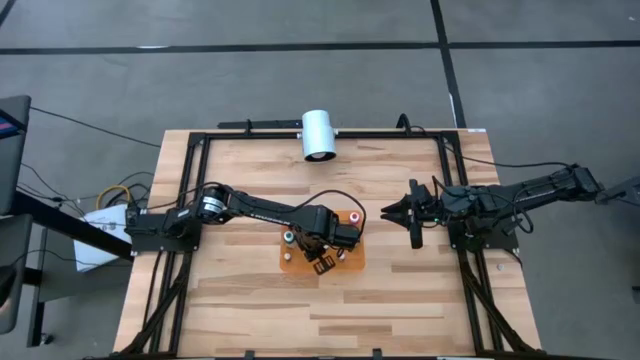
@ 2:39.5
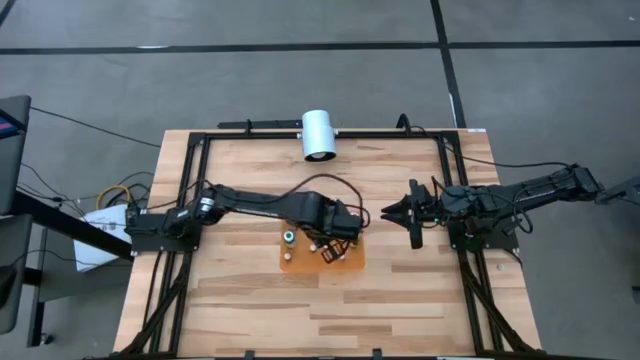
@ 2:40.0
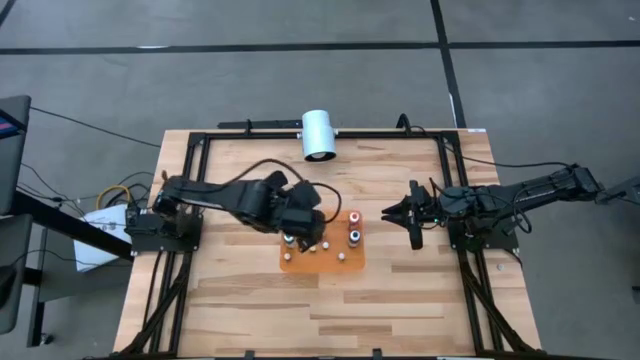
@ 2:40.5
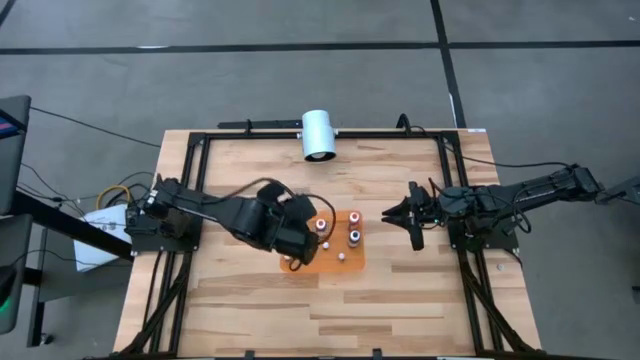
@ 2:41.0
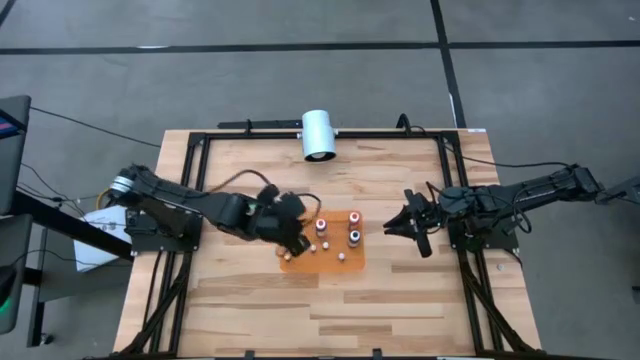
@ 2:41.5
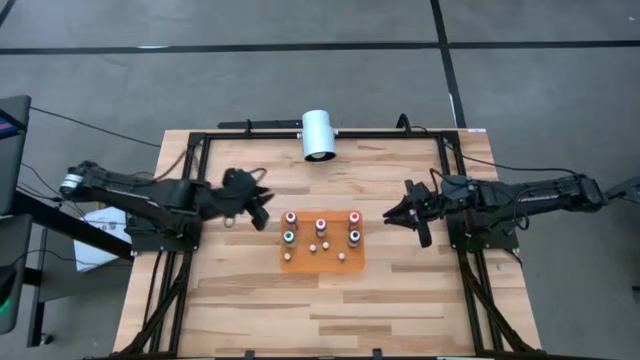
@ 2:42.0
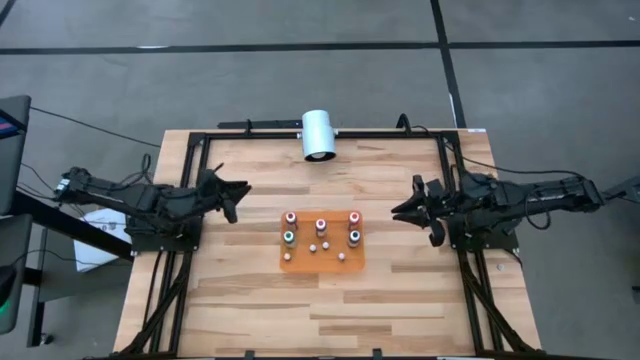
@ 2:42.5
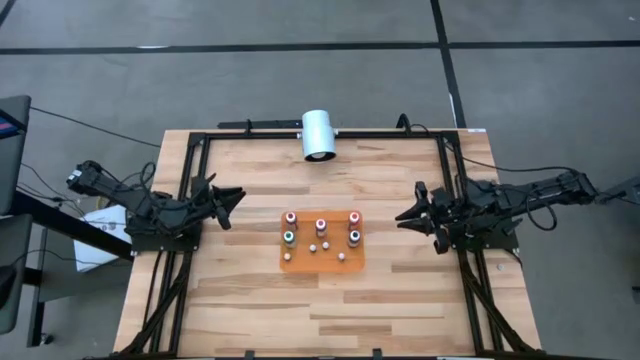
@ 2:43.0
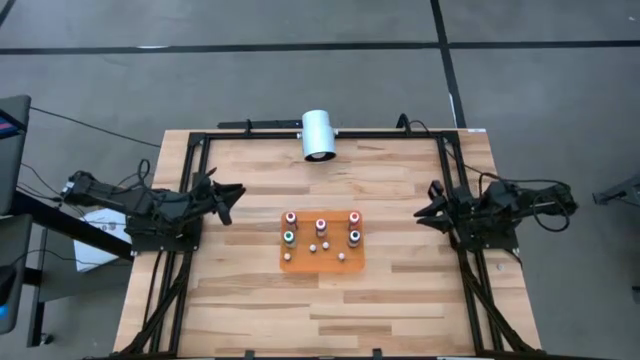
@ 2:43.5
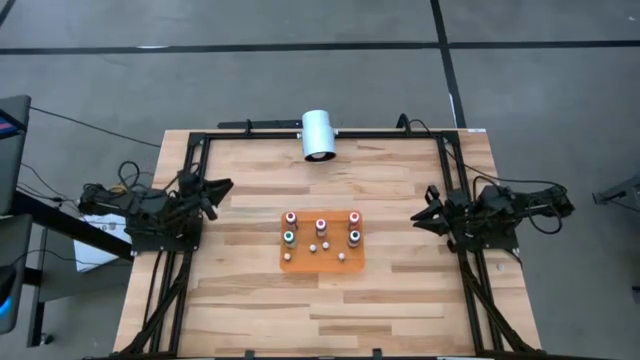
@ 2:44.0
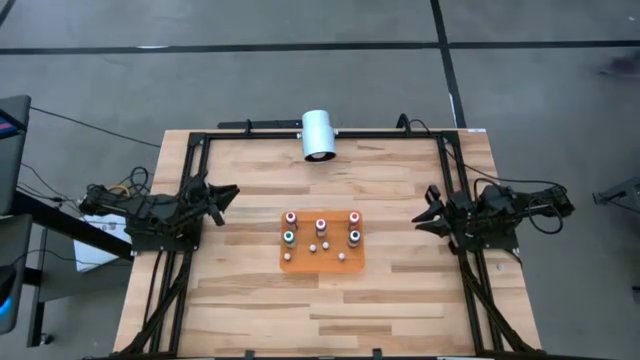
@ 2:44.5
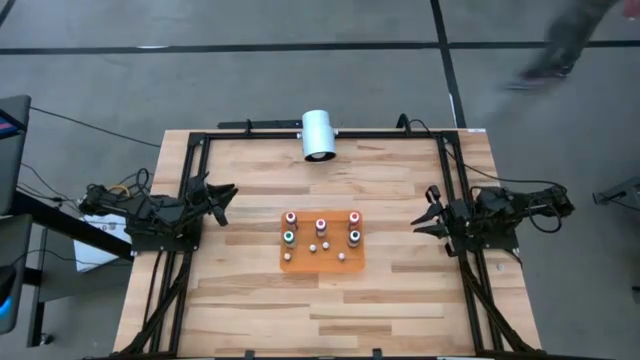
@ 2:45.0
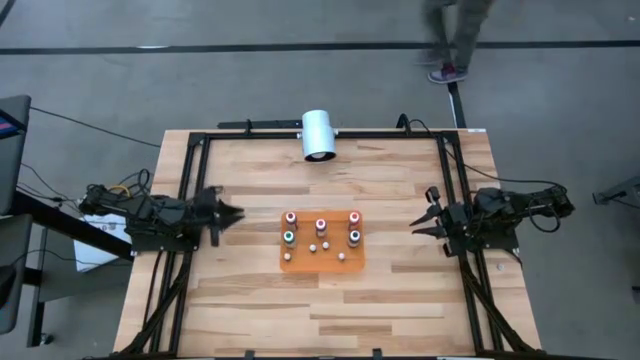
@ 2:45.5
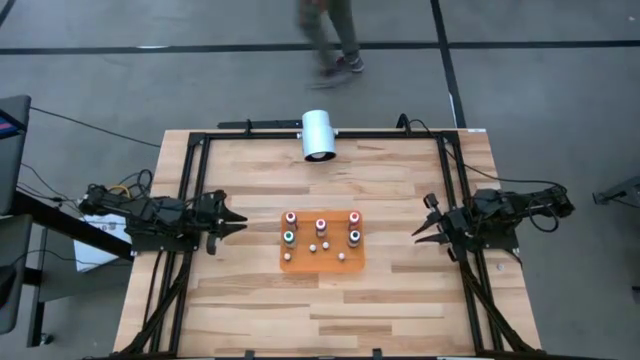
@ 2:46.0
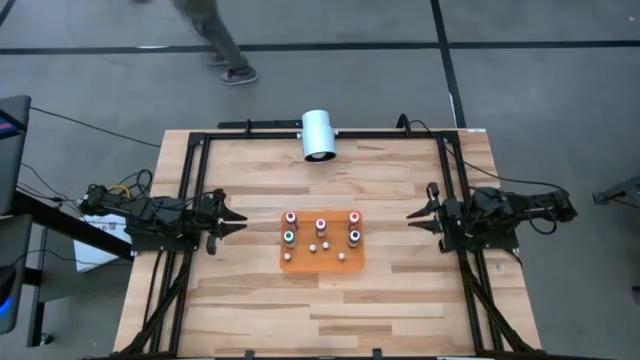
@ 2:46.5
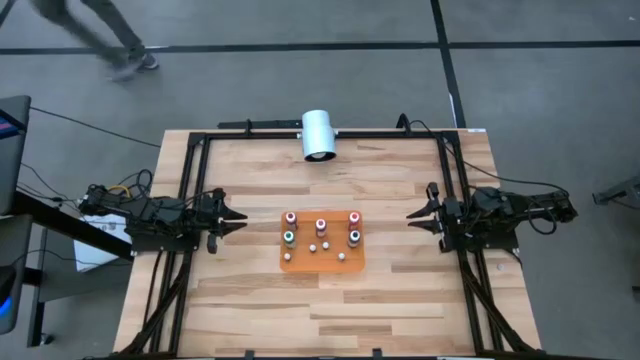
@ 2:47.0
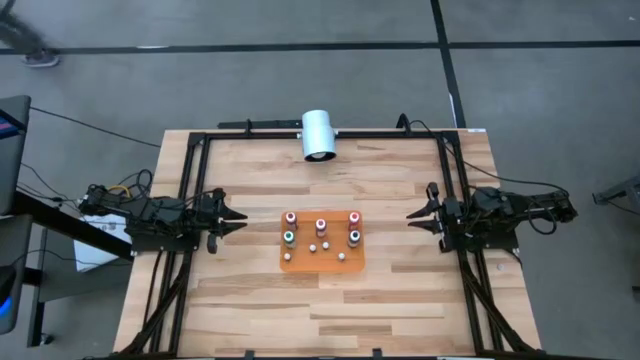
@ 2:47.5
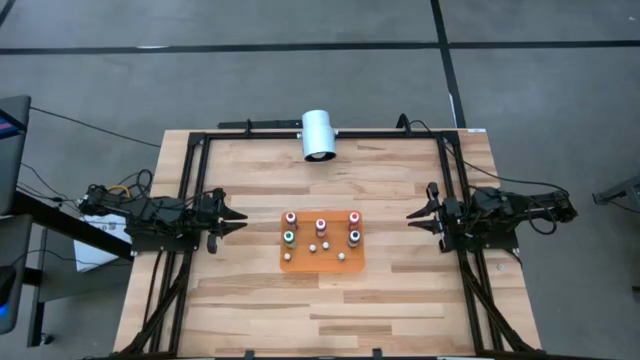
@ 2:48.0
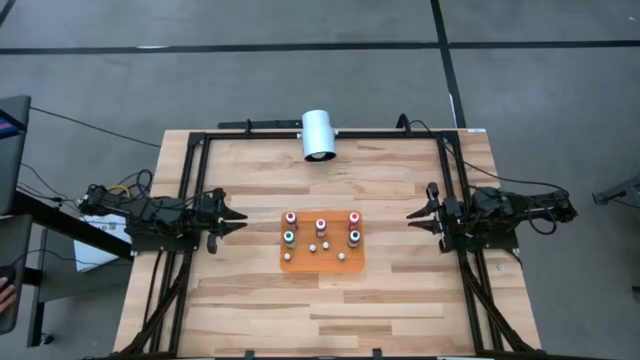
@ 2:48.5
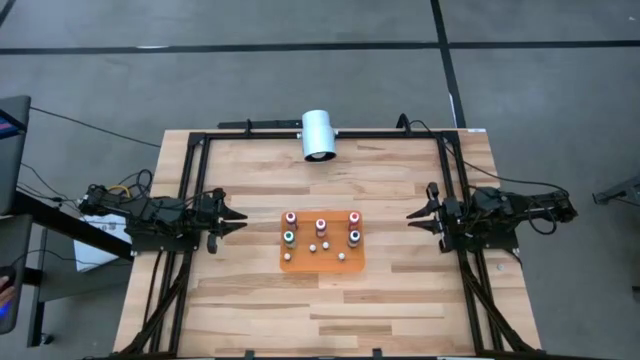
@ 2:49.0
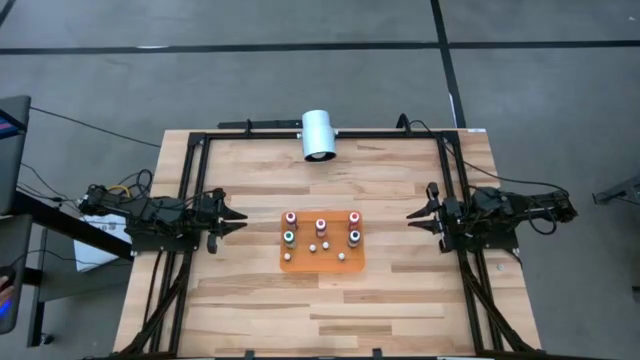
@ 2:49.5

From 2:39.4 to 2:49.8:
Task: Pick & Place food coloring
Return to Home Position

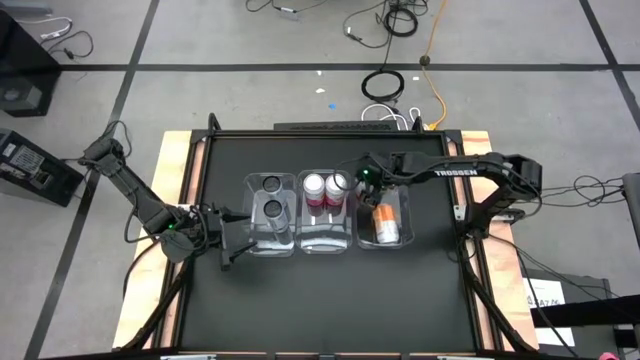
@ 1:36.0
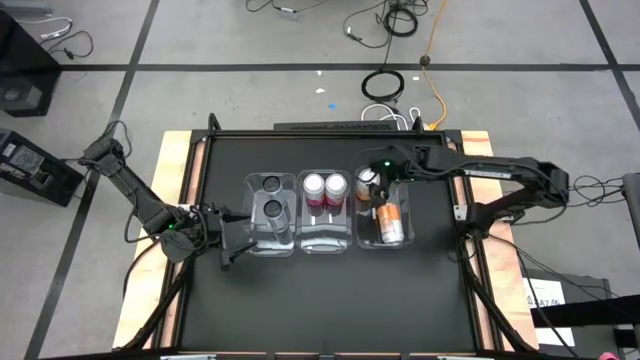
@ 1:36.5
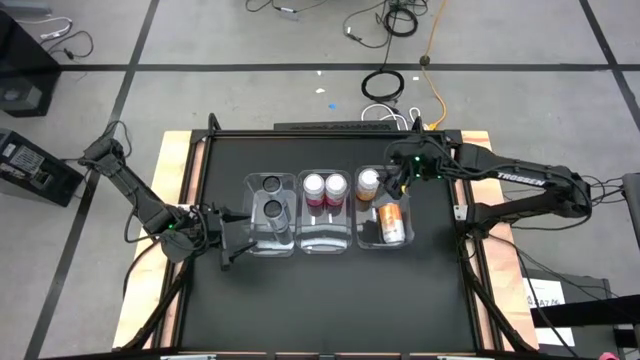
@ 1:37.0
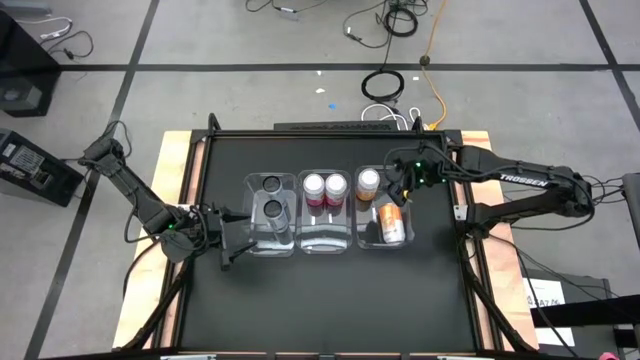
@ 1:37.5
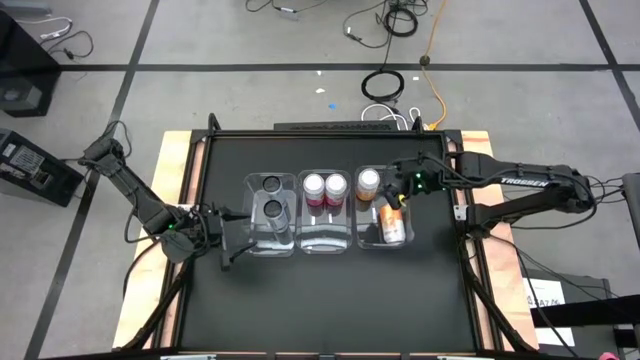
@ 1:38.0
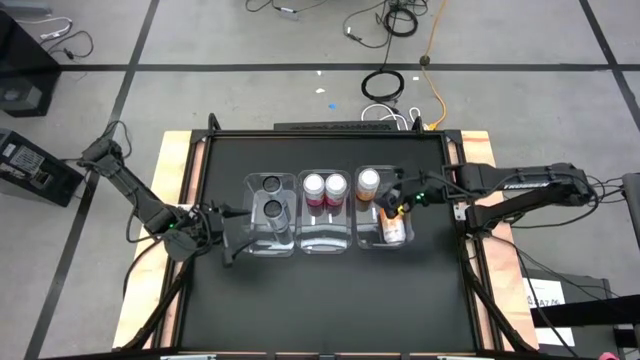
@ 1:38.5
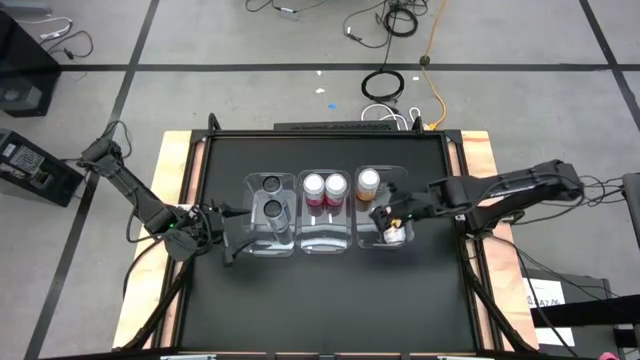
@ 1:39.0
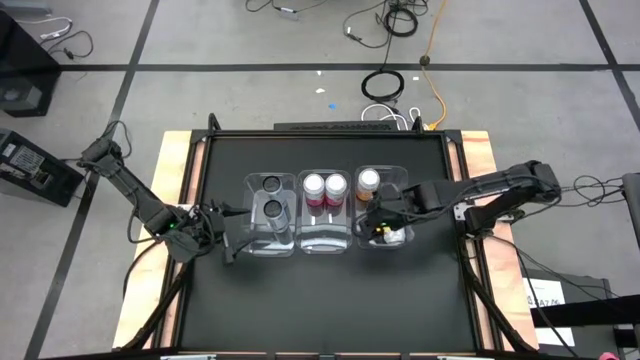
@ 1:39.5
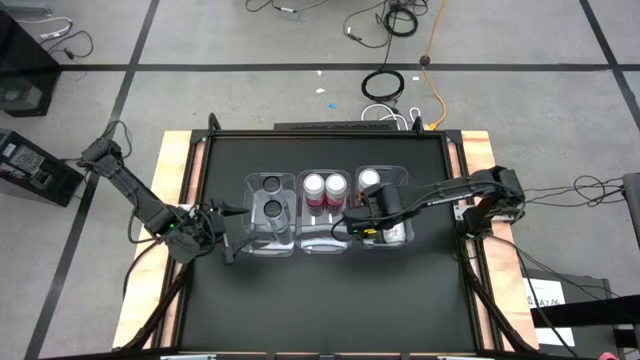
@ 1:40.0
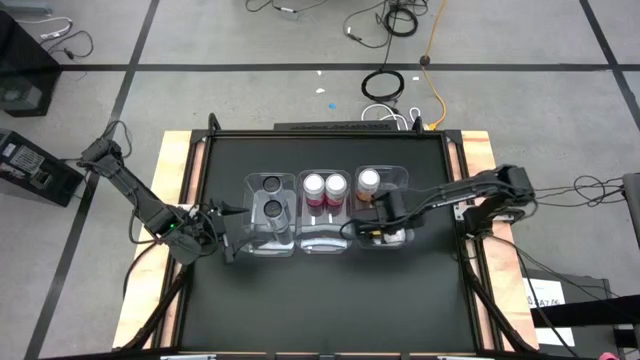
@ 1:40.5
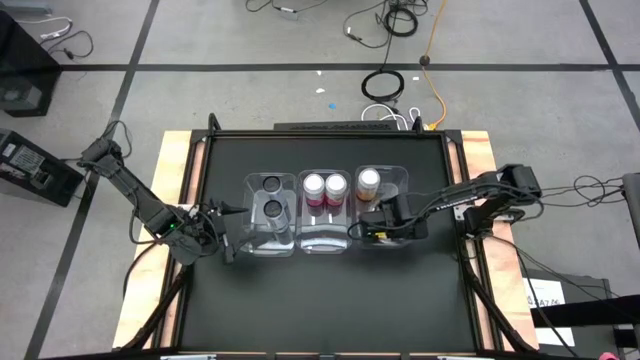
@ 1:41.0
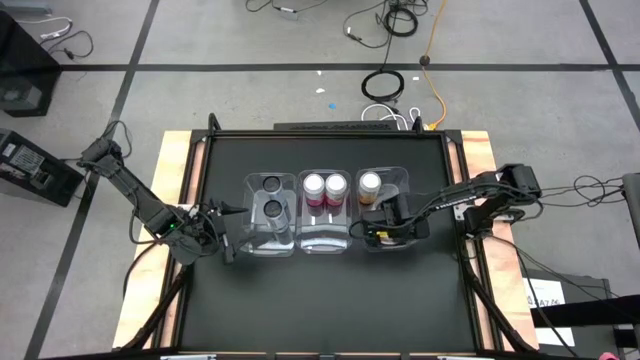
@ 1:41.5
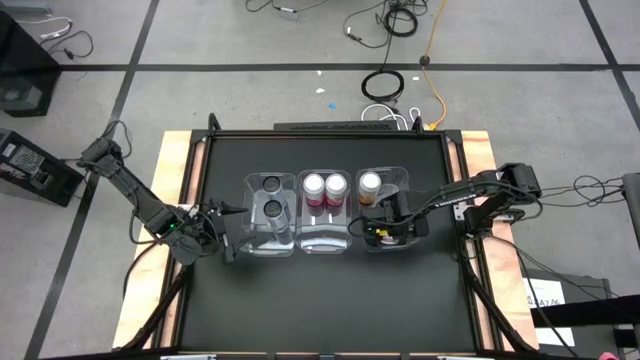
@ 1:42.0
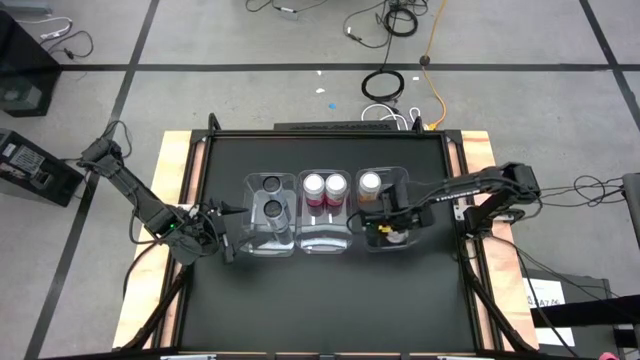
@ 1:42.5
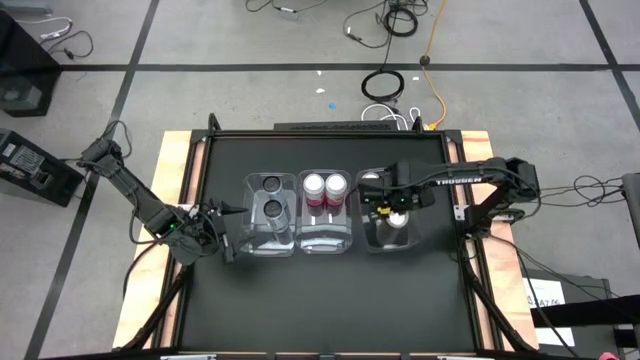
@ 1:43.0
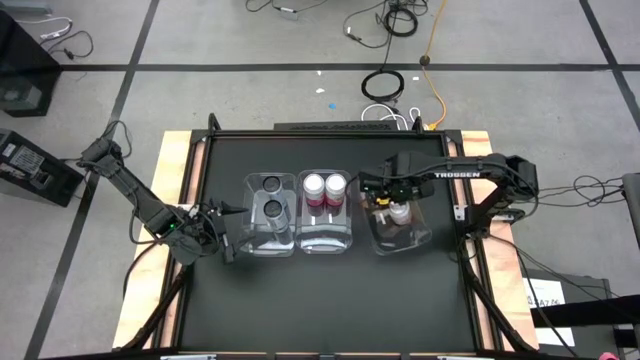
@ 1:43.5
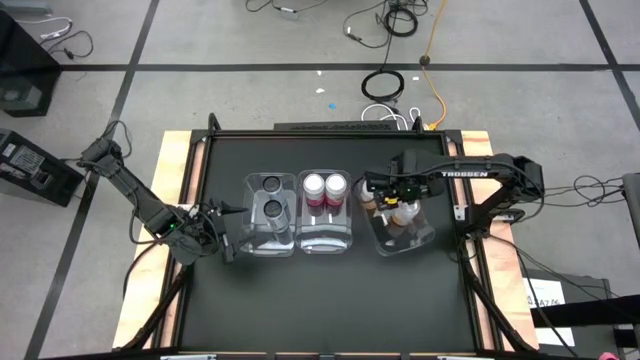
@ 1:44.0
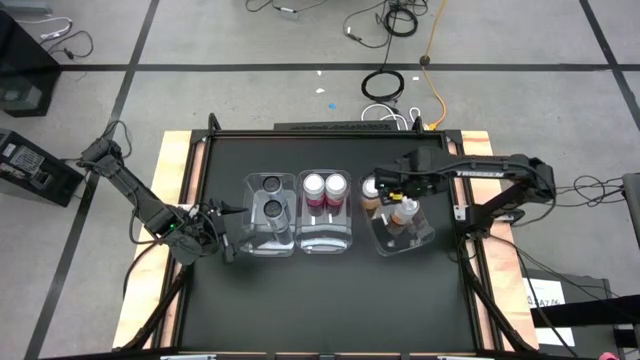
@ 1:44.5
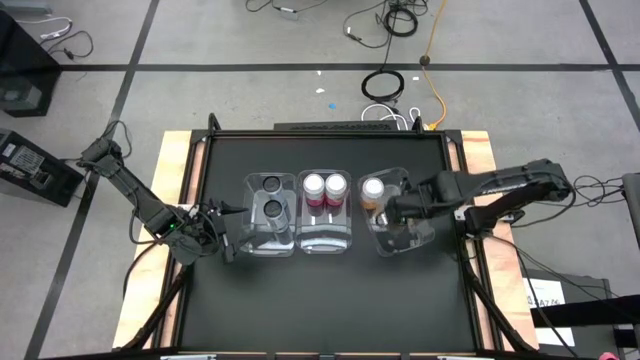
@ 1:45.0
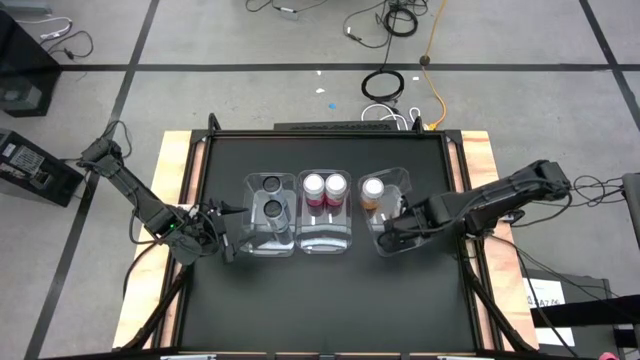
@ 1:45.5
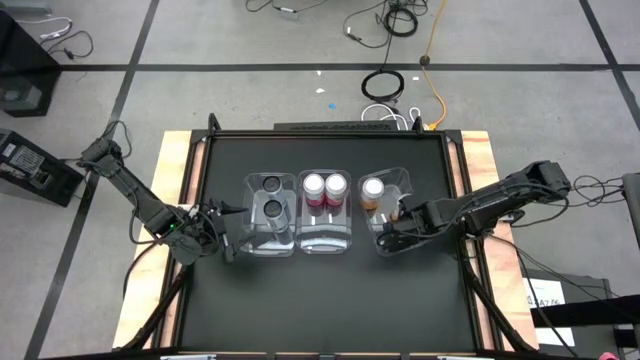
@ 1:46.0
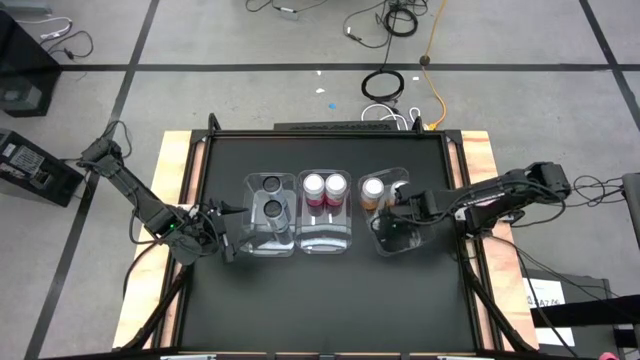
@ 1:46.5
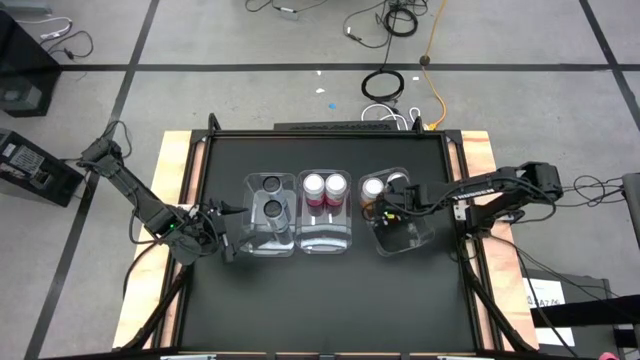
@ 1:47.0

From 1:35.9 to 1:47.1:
Task: Sort soda cans
Adjust the right orange soda can in the right transparent bin

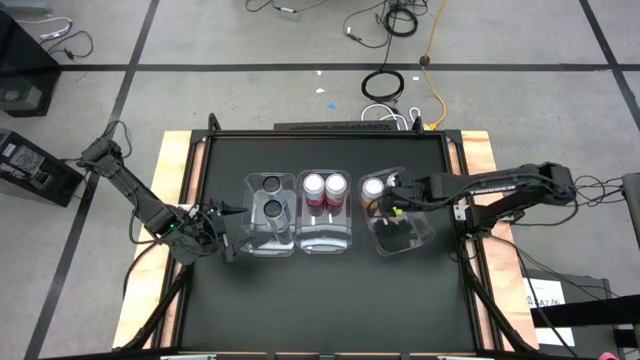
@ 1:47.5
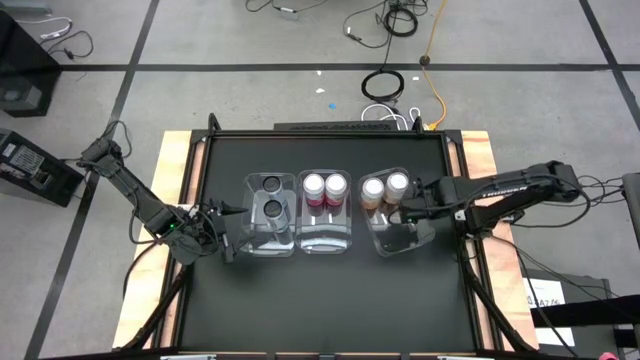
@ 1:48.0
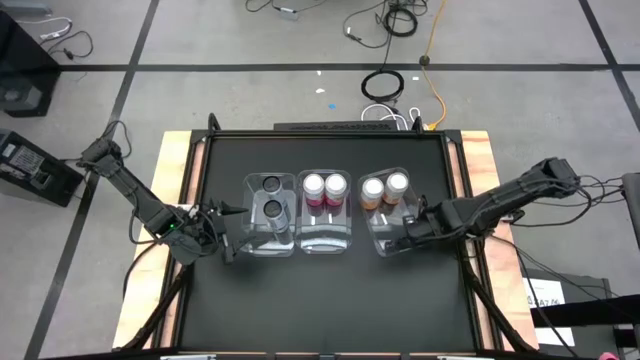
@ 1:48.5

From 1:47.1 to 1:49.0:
Adjust the right transparent bin
